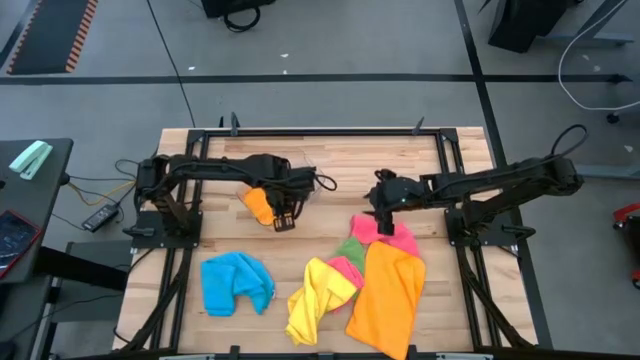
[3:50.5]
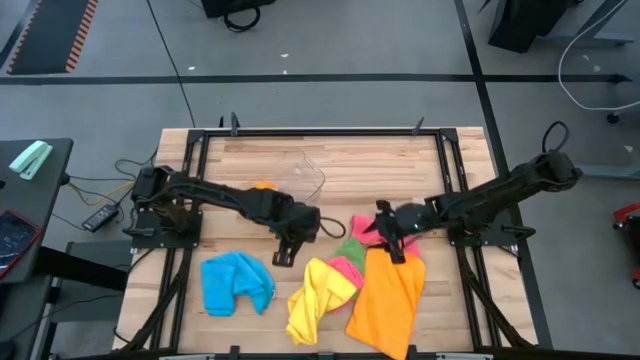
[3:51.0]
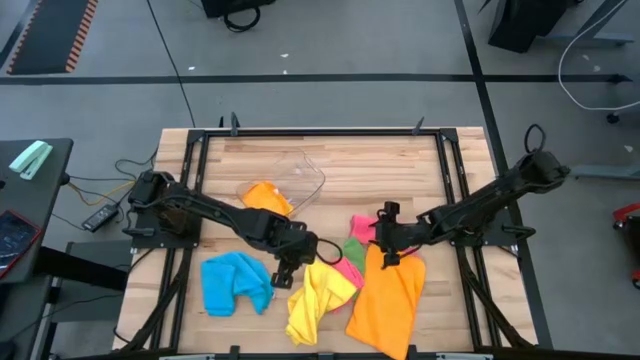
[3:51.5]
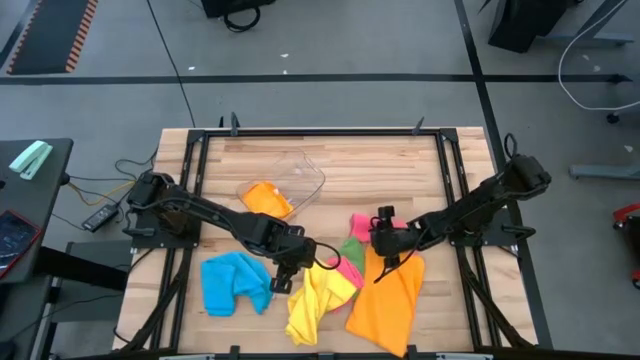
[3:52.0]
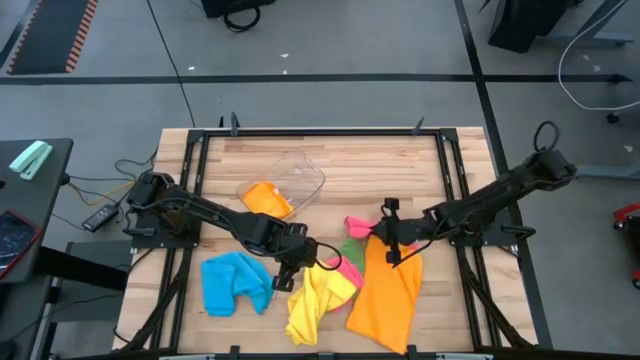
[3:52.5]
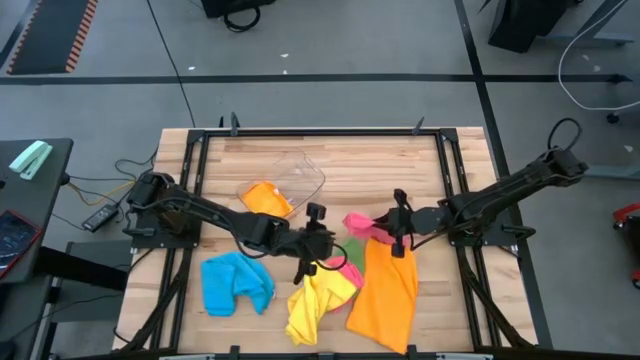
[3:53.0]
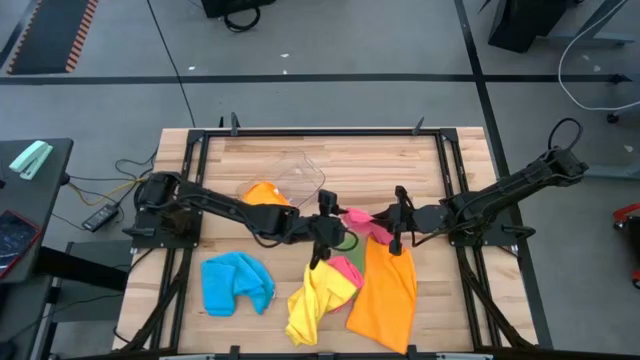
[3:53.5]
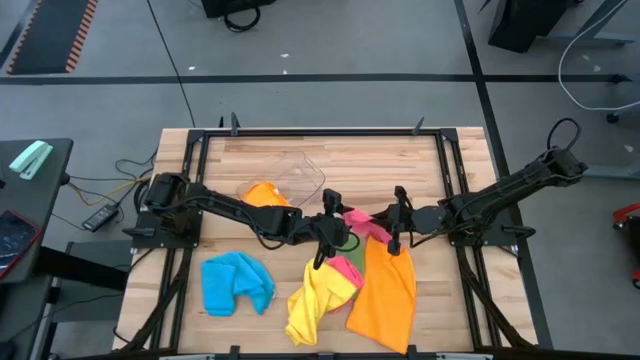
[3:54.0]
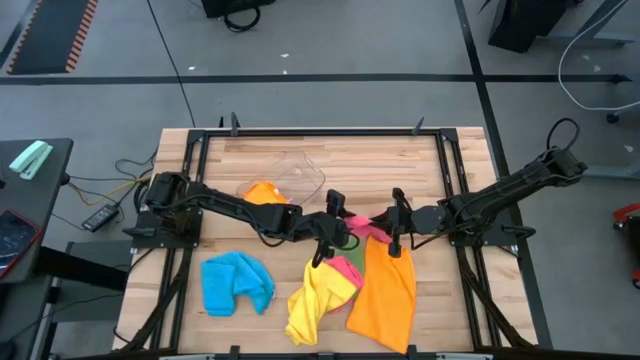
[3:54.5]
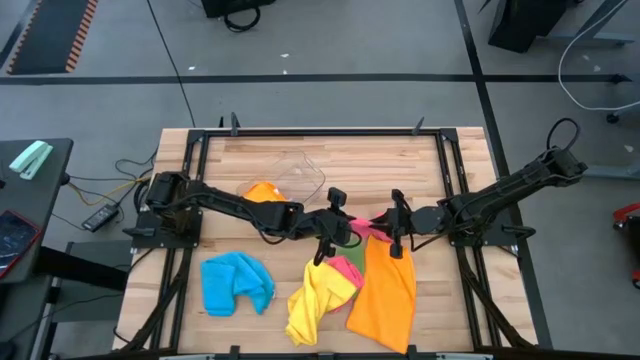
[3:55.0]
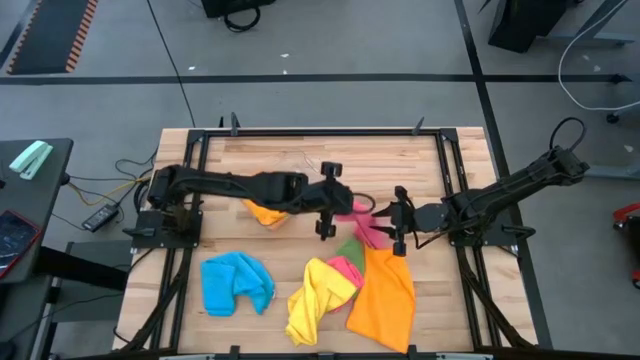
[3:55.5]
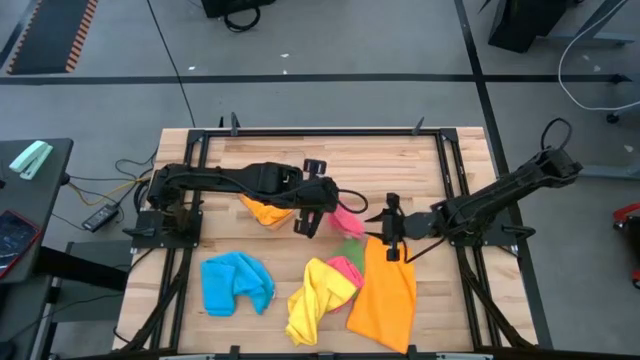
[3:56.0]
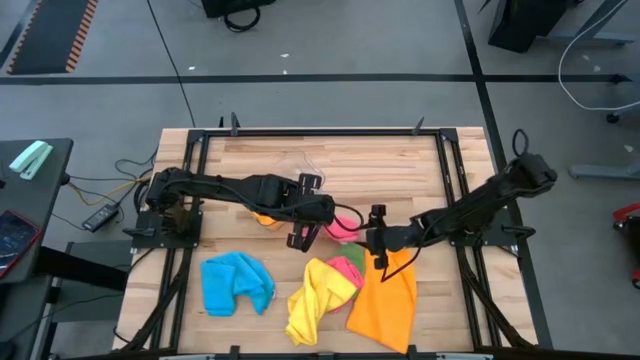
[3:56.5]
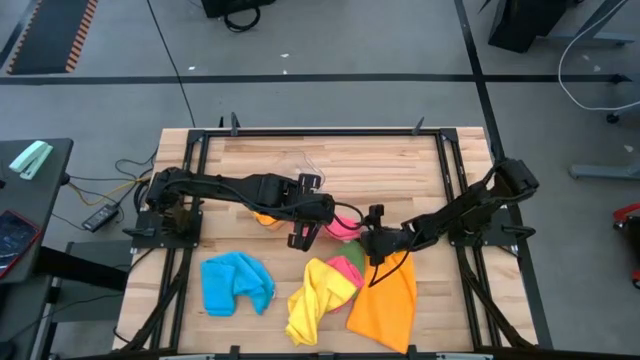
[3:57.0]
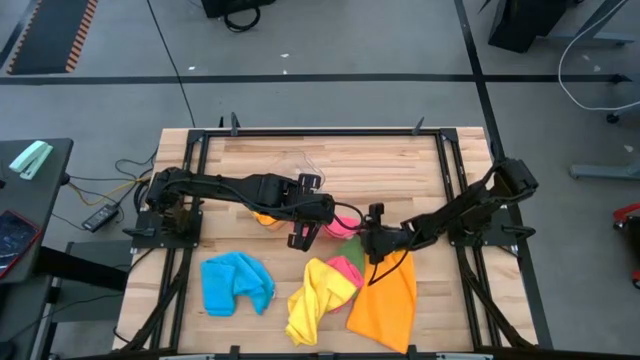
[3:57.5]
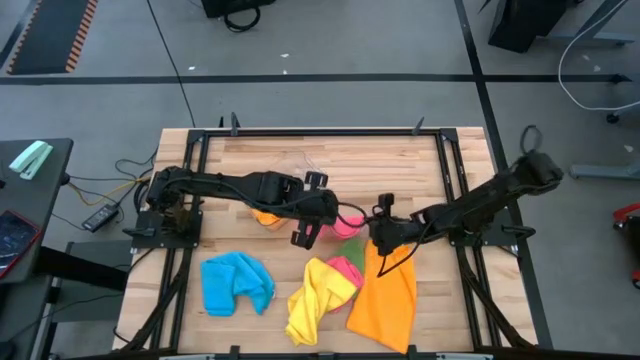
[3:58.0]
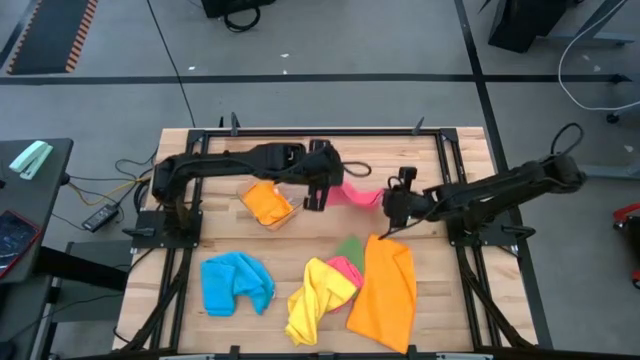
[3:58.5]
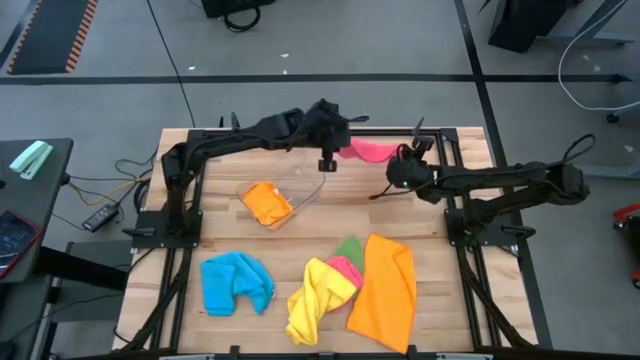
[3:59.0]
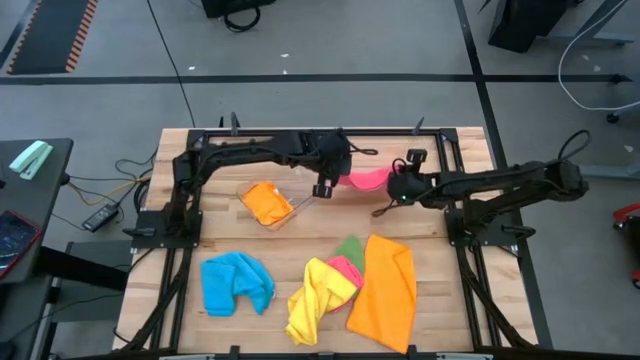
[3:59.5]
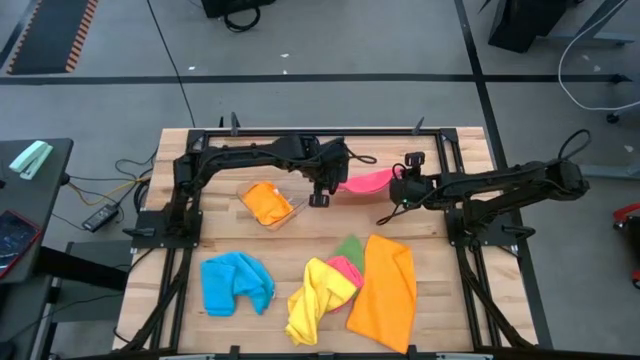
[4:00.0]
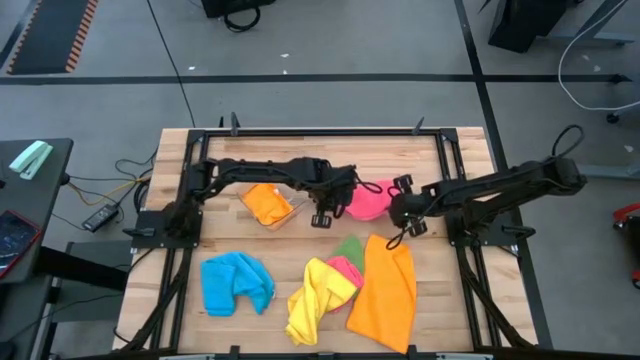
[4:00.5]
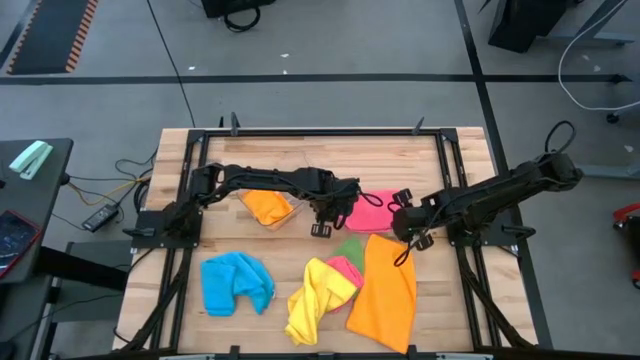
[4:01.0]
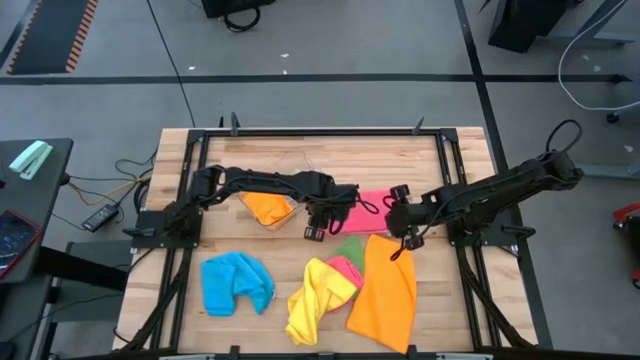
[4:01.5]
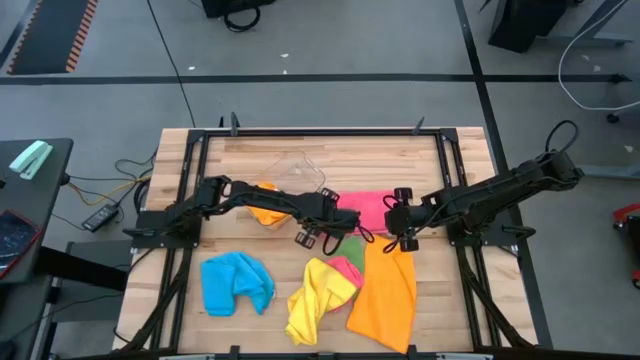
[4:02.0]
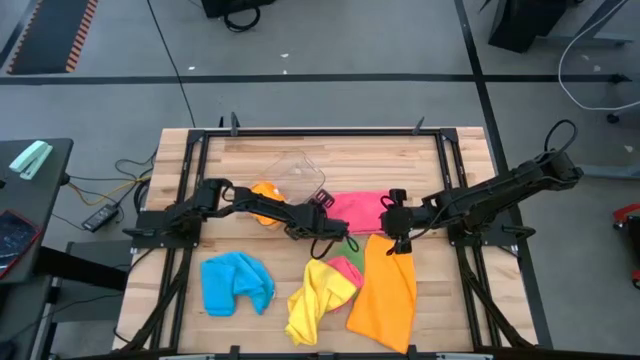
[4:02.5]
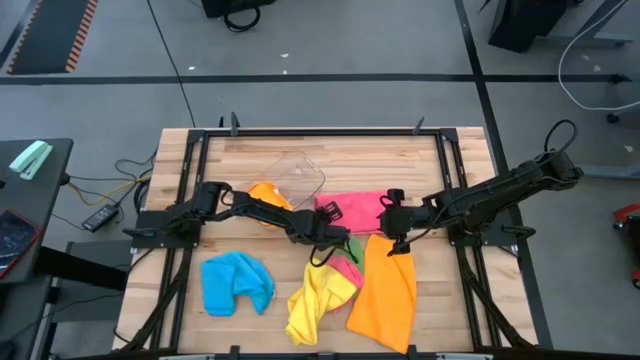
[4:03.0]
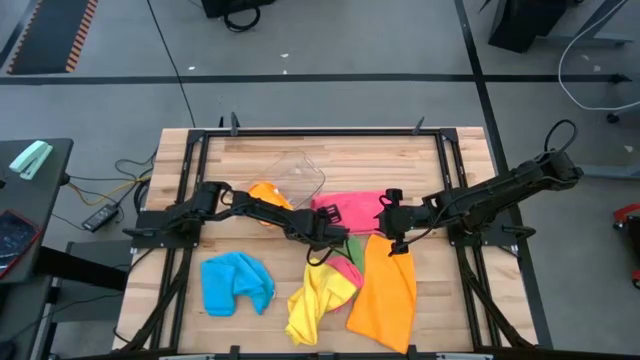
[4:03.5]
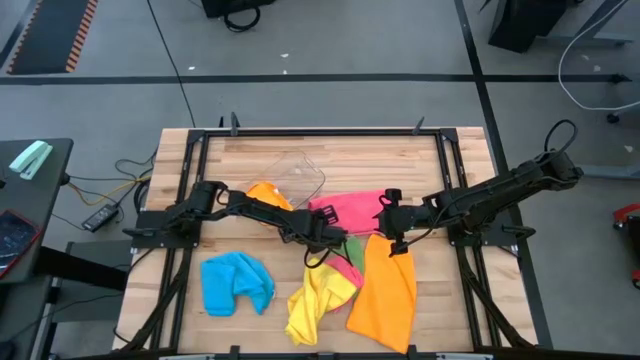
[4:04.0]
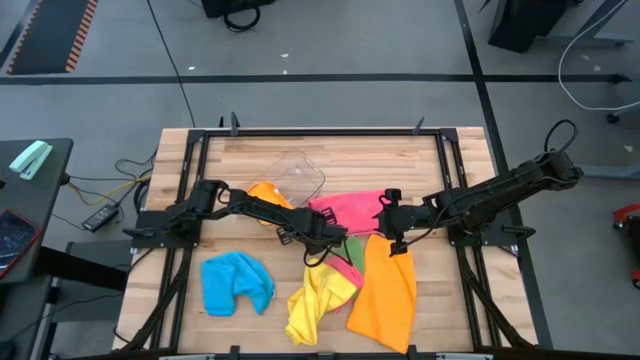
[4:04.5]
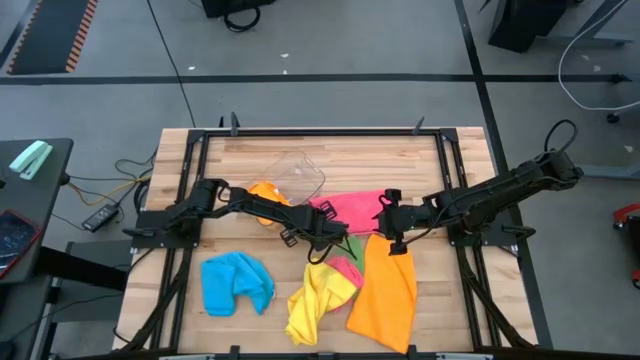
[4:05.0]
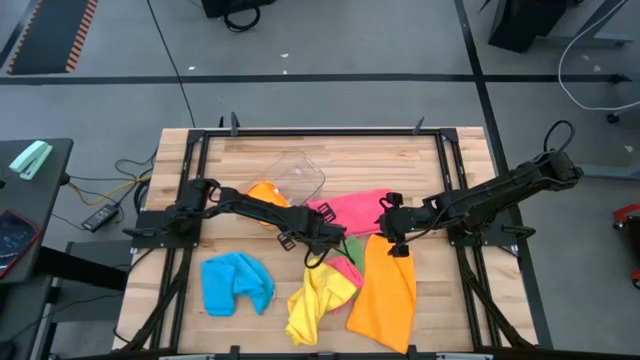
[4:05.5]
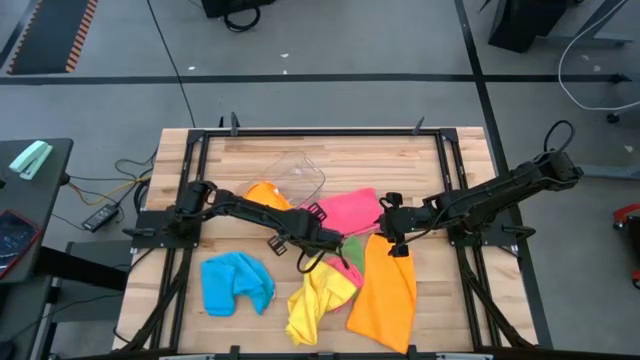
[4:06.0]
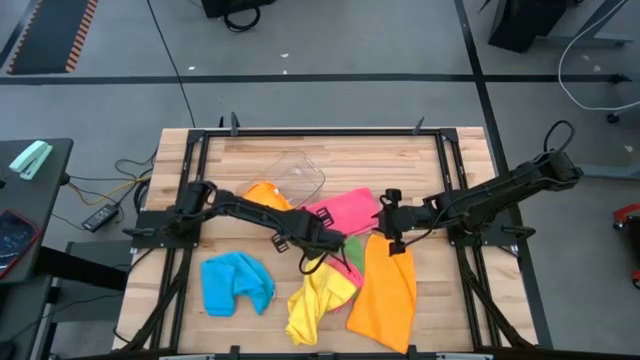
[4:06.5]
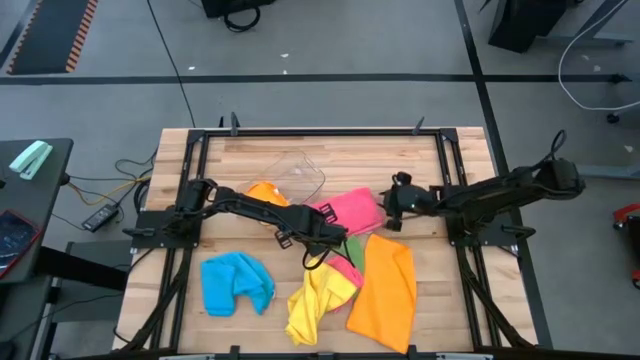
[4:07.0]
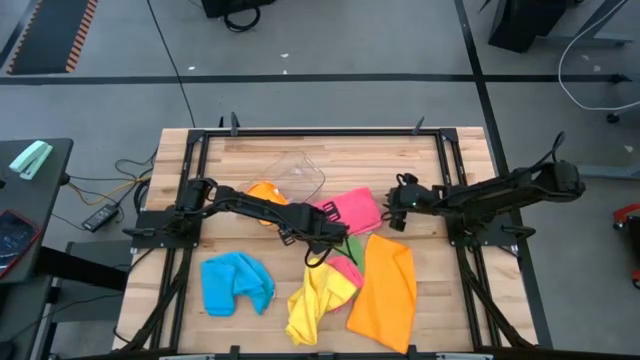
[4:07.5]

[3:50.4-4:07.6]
Task: Fold microfiber towels
Fold the pink microfiber towel
